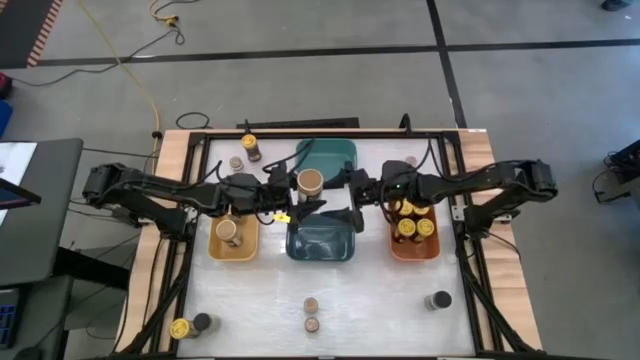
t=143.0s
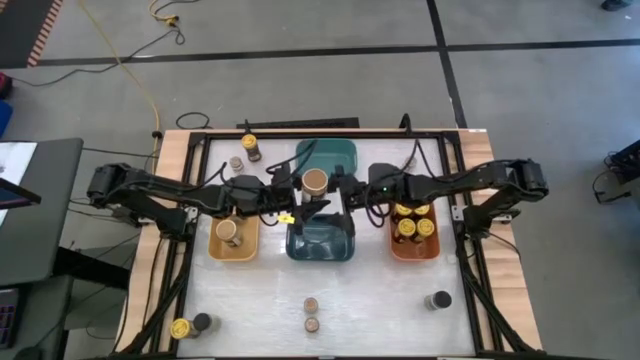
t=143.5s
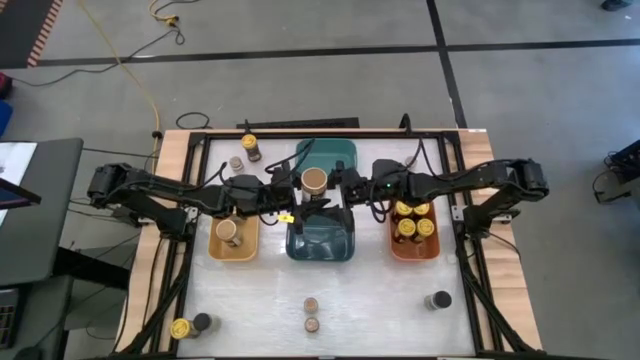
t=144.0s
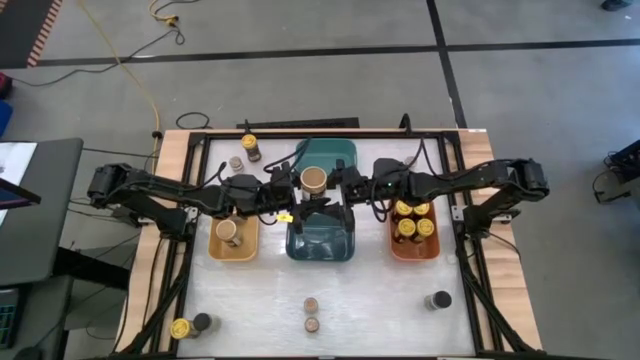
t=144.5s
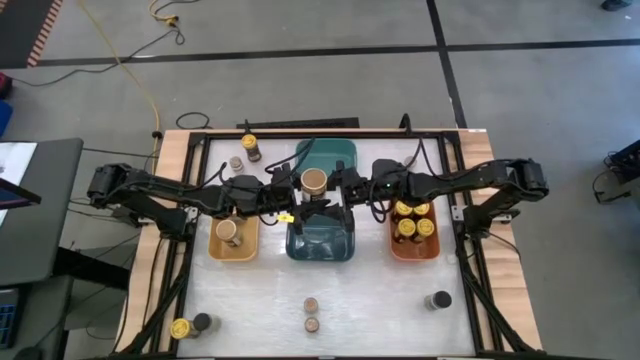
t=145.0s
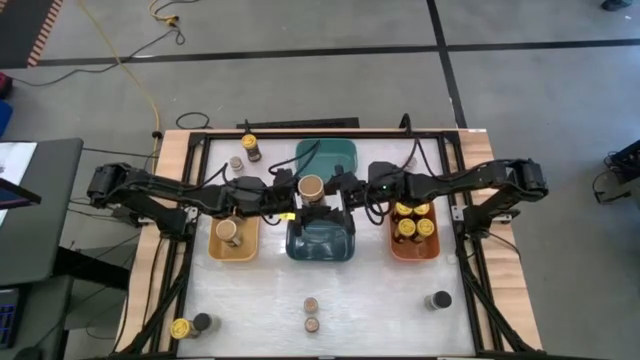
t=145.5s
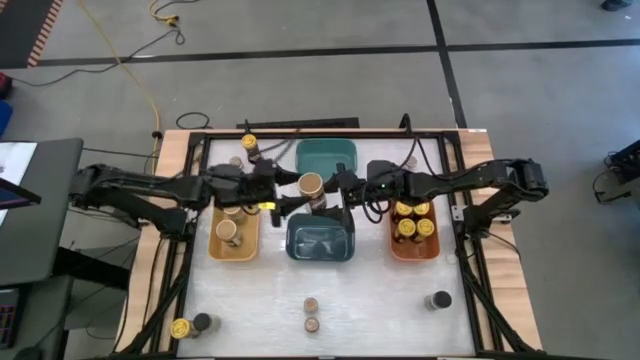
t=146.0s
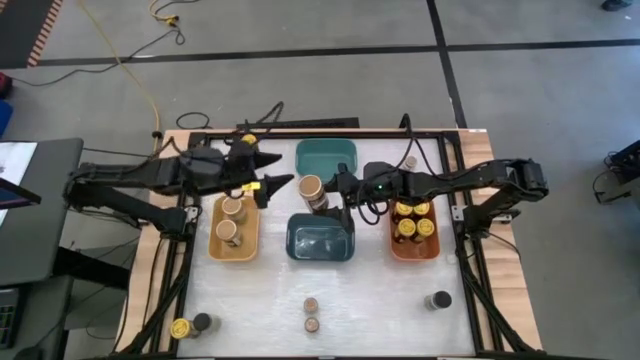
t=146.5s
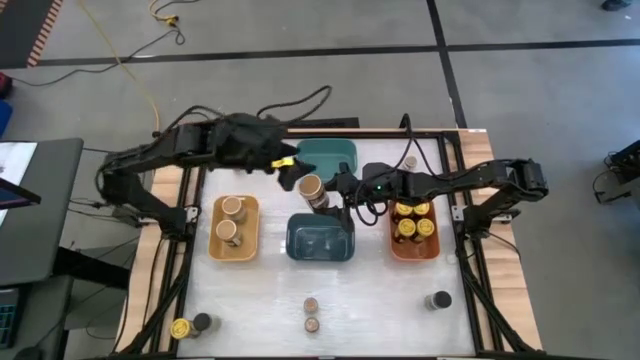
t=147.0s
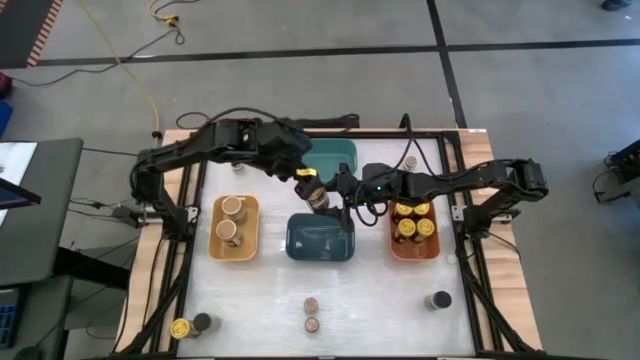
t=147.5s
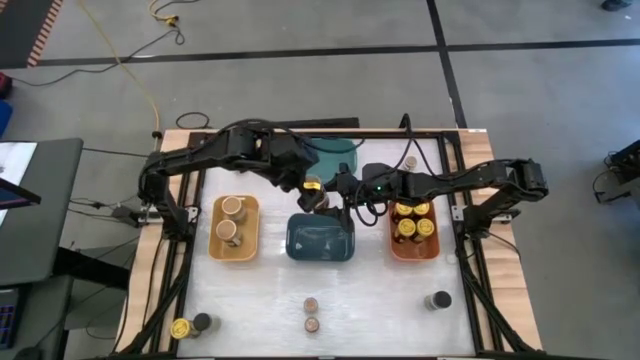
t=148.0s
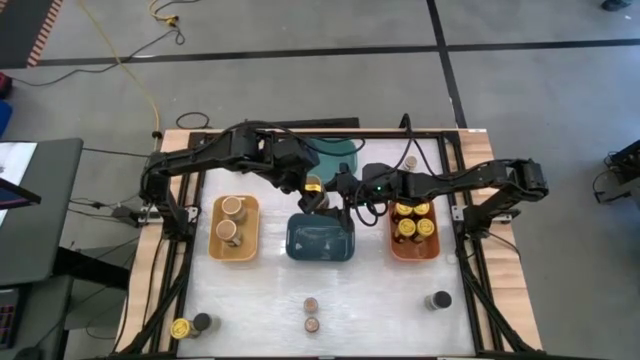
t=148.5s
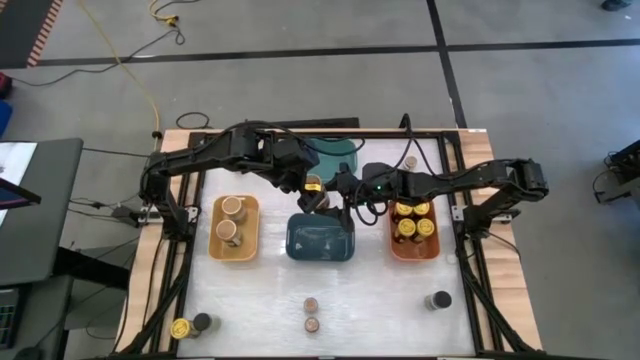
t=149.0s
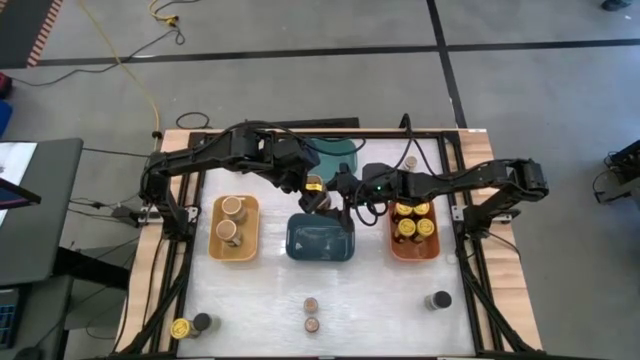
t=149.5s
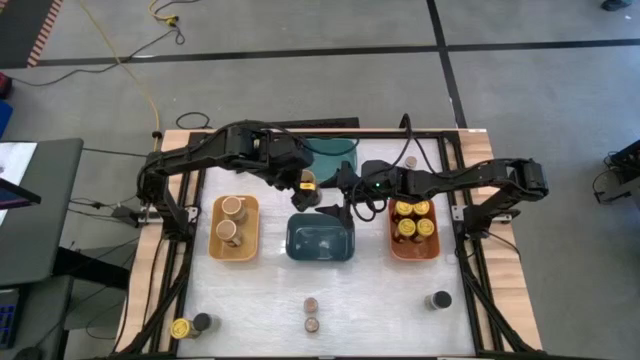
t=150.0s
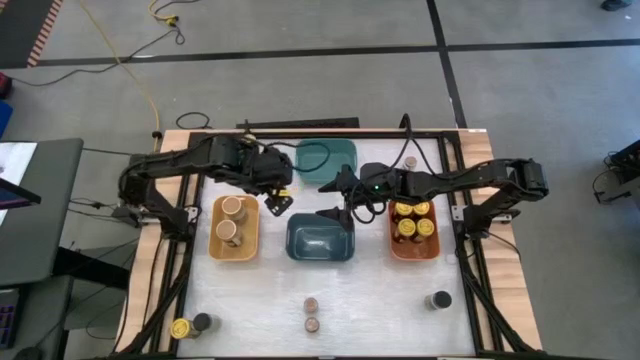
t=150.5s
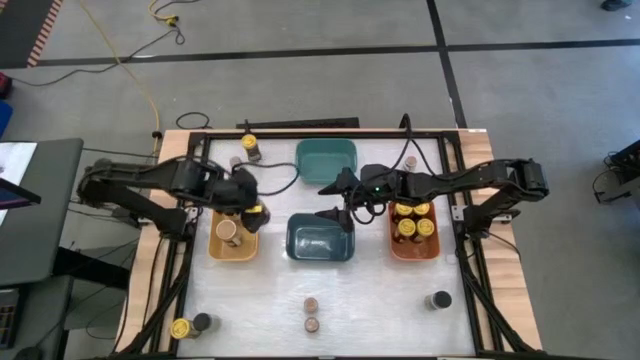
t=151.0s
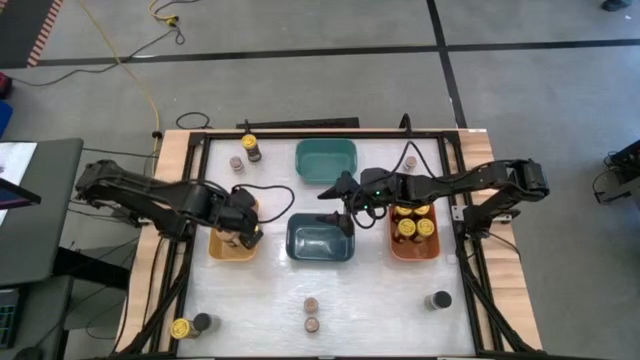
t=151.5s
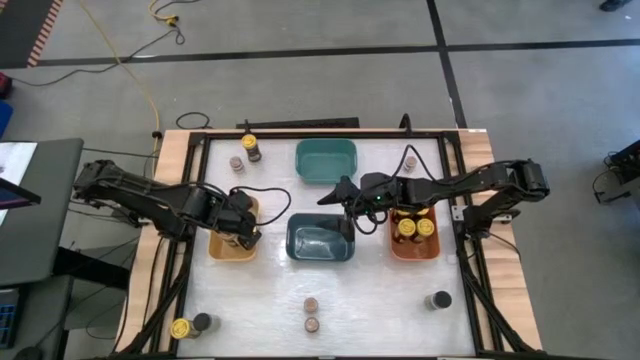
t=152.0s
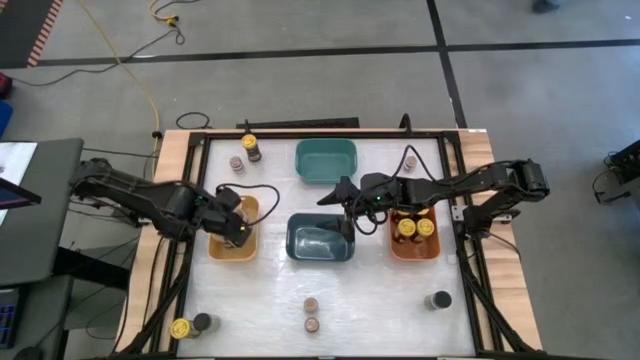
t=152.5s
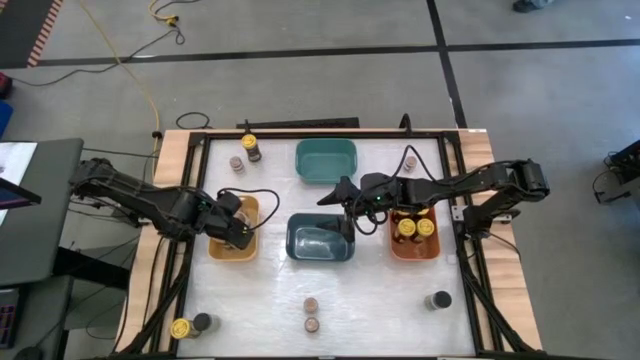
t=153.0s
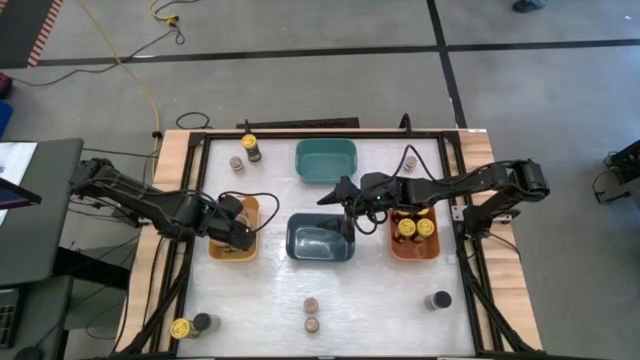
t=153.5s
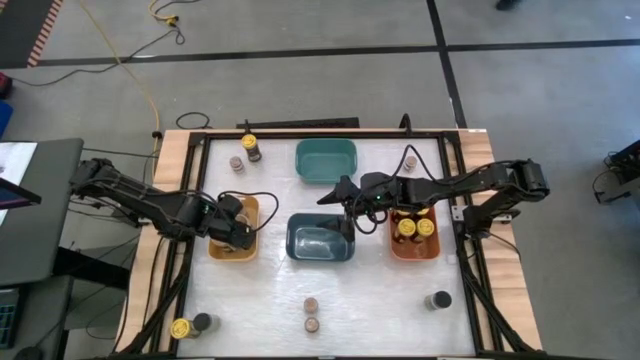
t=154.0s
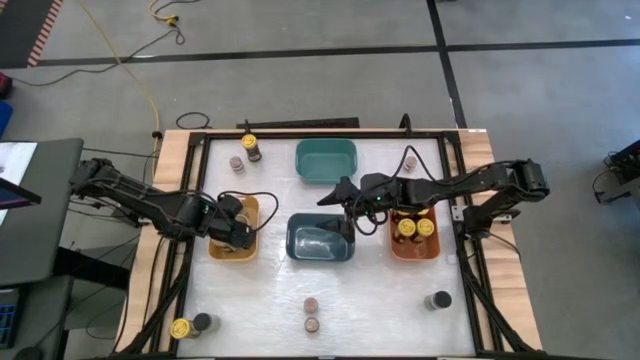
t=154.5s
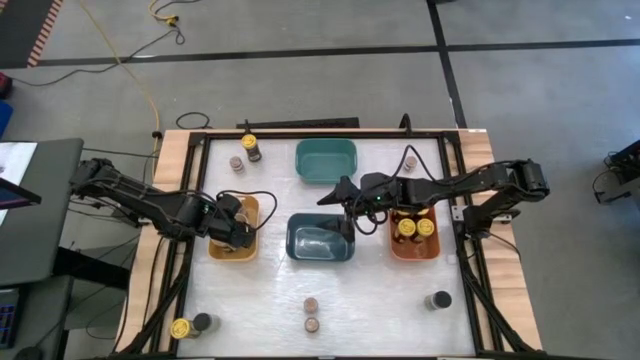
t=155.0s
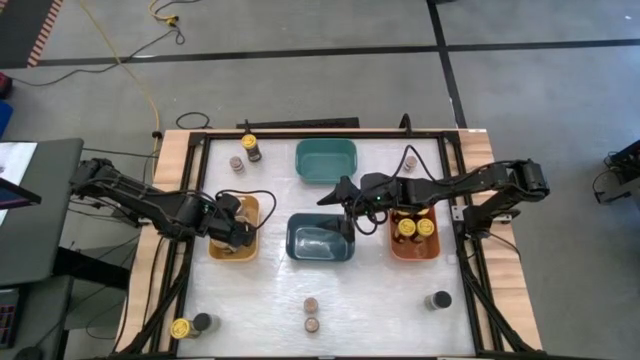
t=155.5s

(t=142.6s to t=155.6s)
Task: Sort spices by type
Put the gold seasoning bottle into the yellow bin

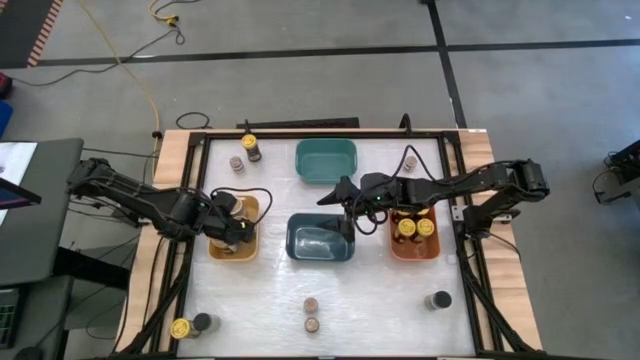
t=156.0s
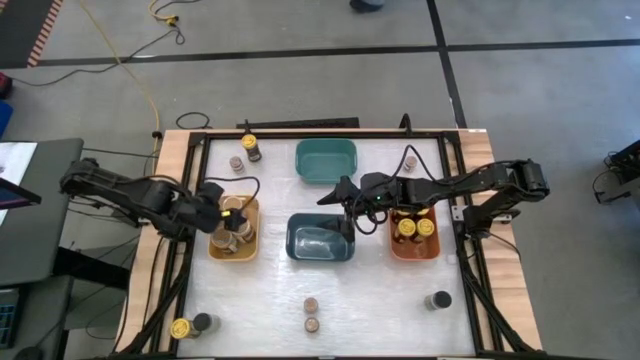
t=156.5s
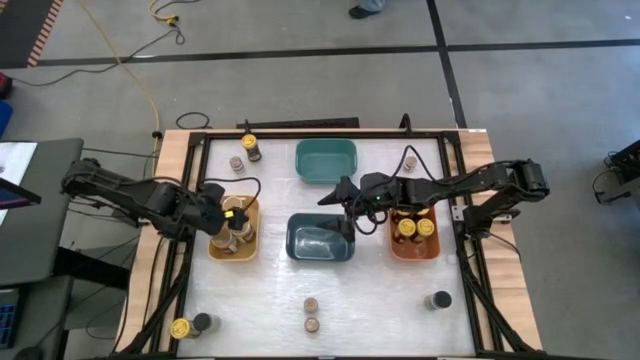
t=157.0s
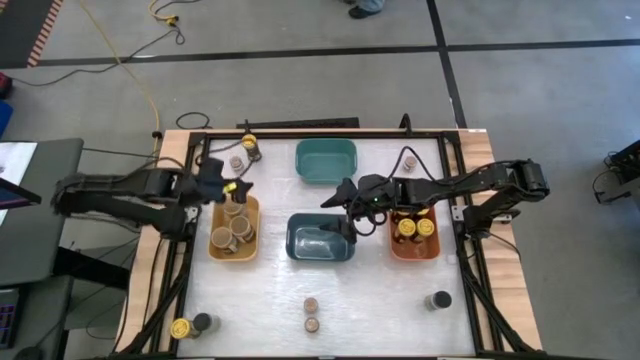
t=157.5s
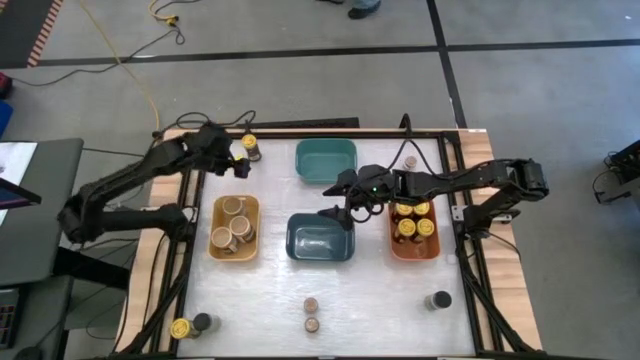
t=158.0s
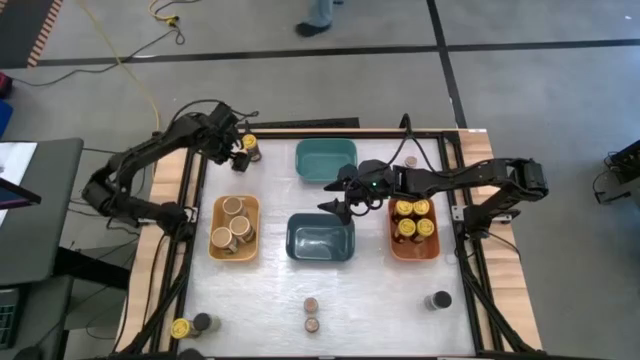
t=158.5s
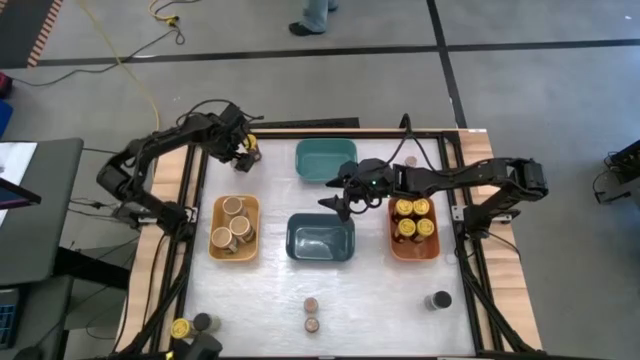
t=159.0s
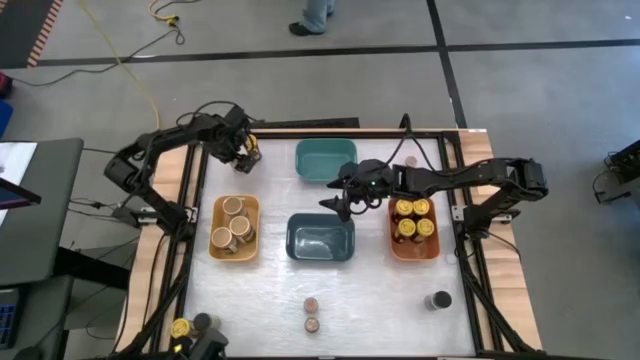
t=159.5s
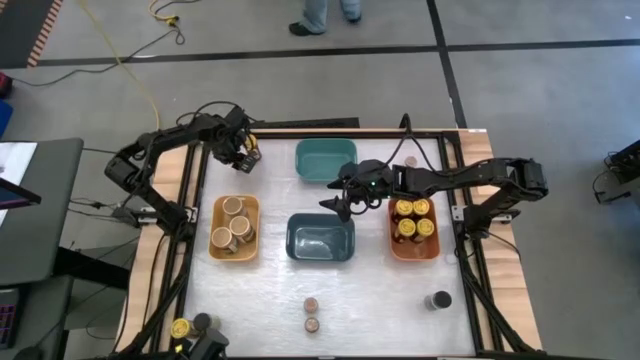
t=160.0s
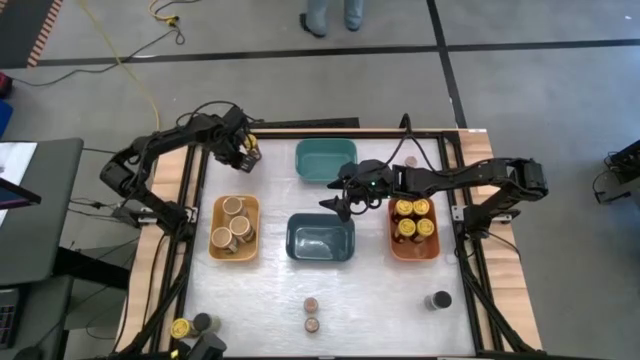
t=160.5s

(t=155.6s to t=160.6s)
Put the brown seasoning bottle into the green bin

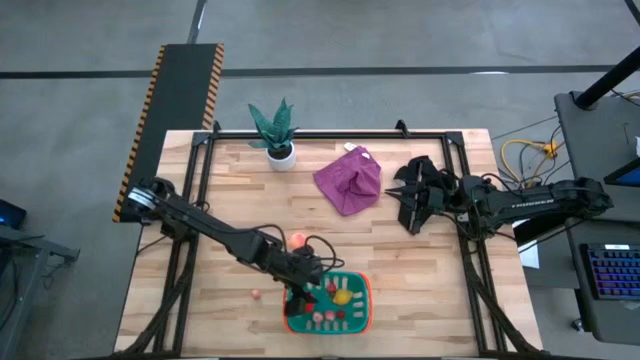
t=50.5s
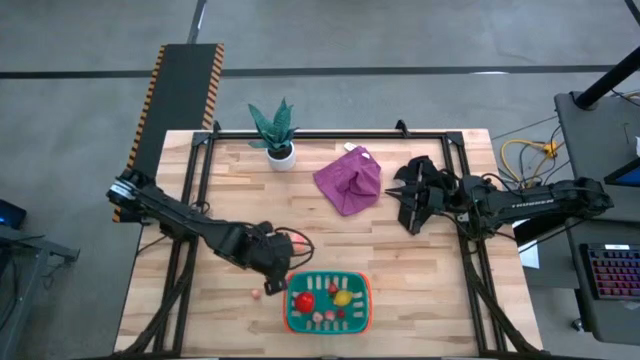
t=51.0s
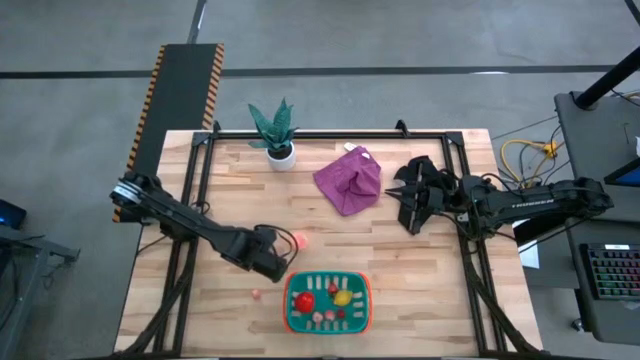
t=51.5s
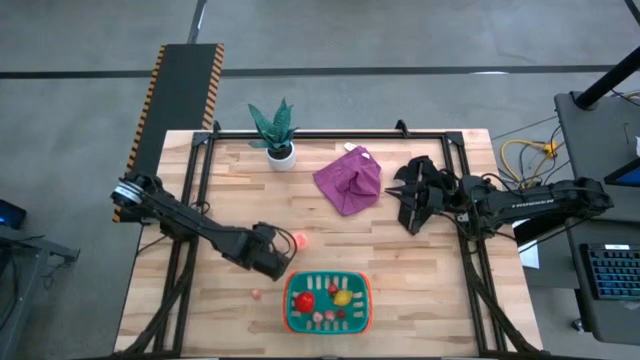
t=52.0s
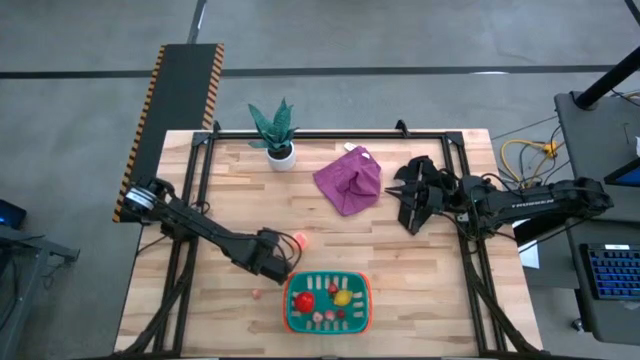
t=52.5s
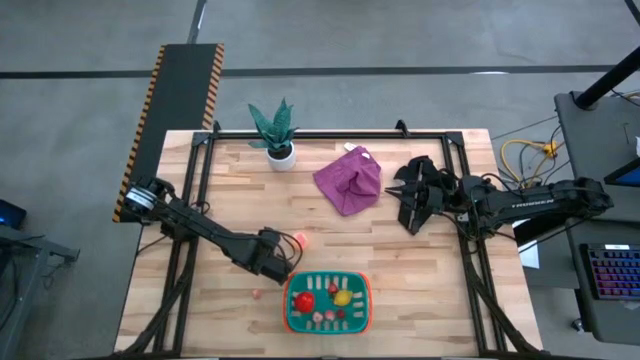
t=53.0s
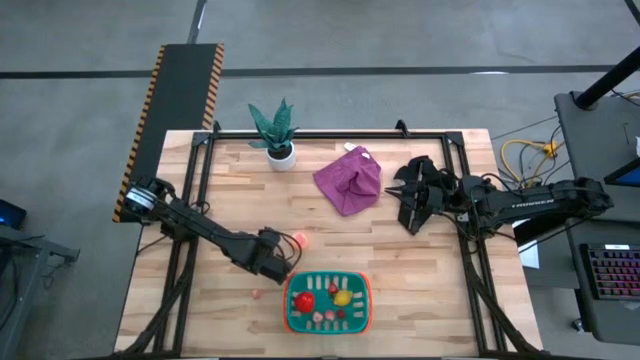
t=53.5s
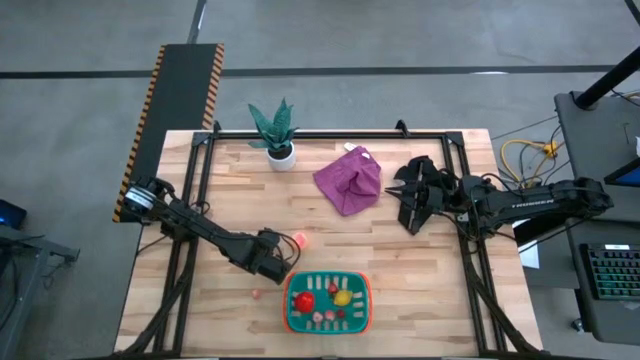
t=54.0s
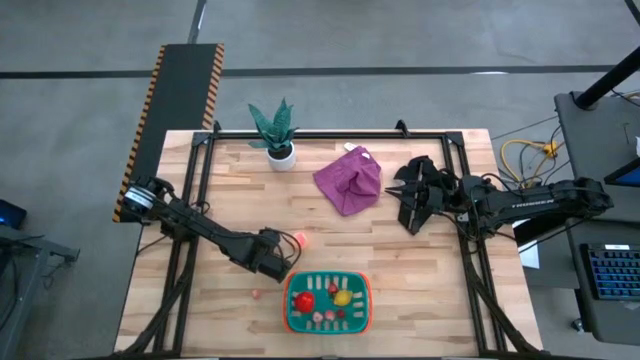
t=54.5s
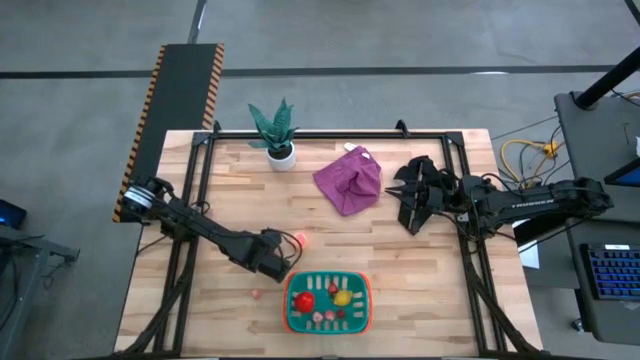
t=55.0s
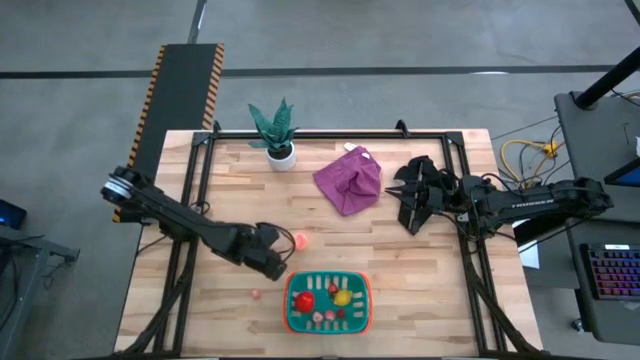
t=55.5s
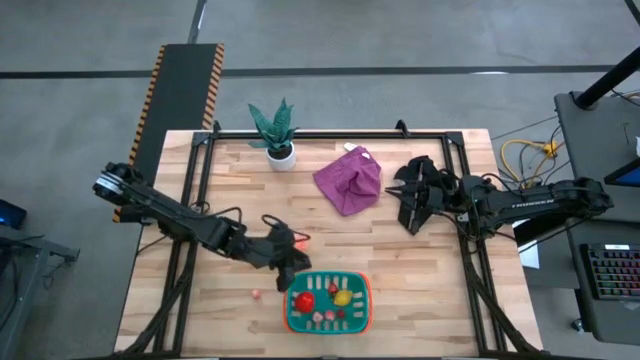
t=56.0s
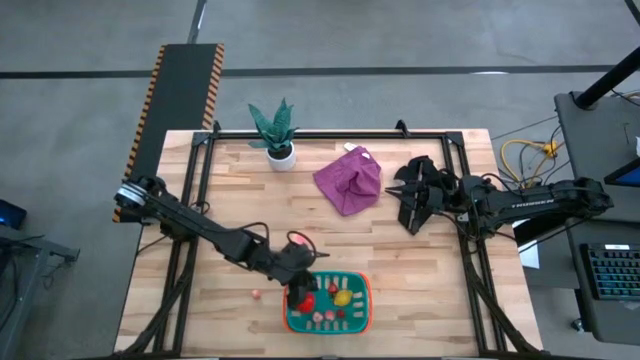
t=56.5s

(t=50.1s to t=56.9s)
Task: Pick and placing Produce into tupperware
Put the black cherry into the green basket
